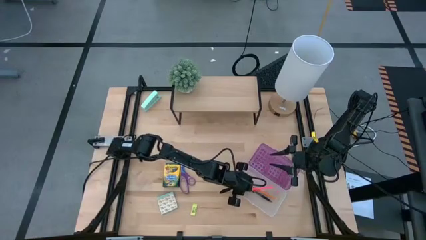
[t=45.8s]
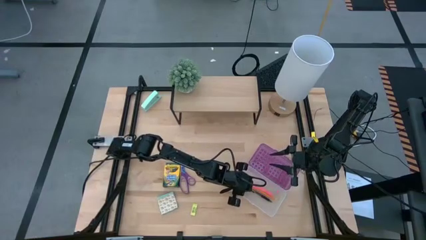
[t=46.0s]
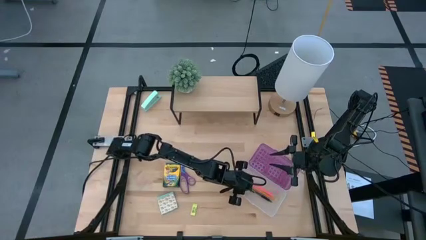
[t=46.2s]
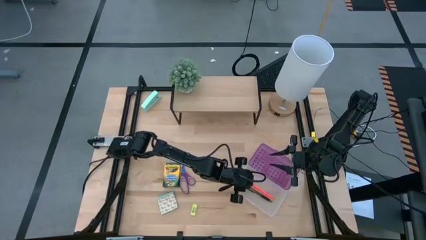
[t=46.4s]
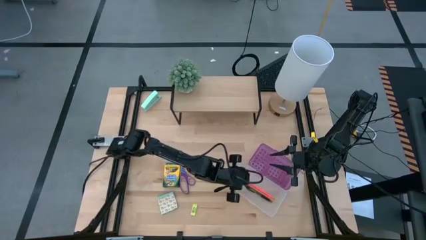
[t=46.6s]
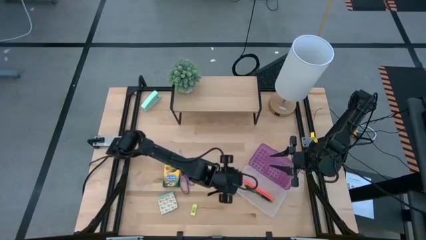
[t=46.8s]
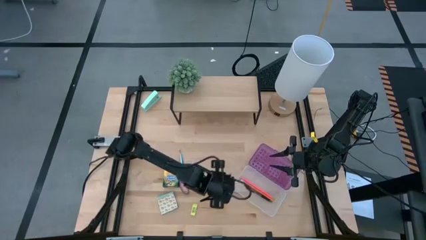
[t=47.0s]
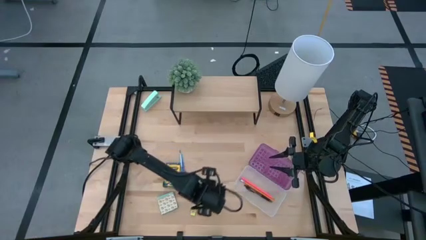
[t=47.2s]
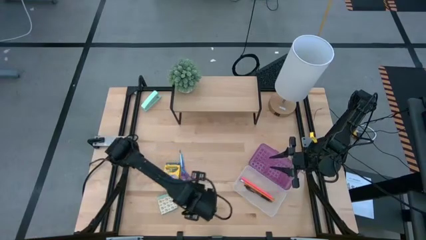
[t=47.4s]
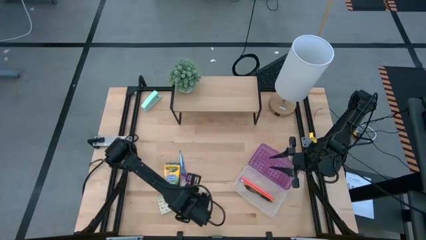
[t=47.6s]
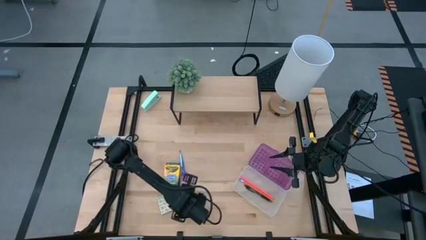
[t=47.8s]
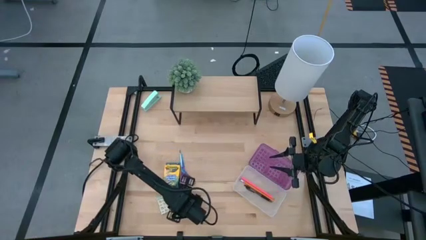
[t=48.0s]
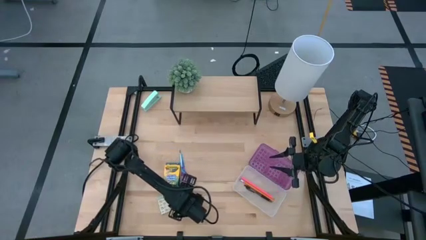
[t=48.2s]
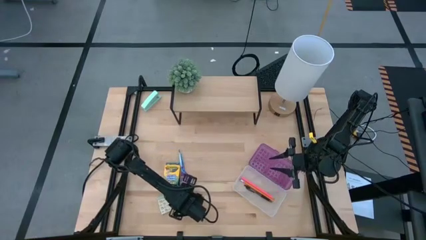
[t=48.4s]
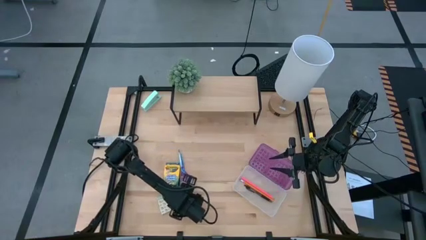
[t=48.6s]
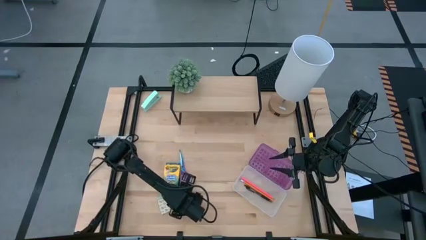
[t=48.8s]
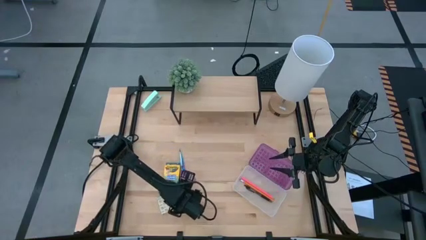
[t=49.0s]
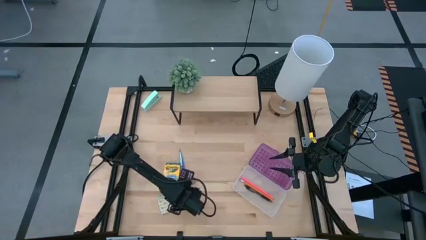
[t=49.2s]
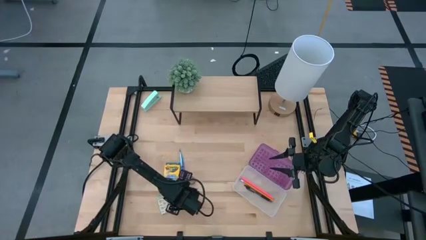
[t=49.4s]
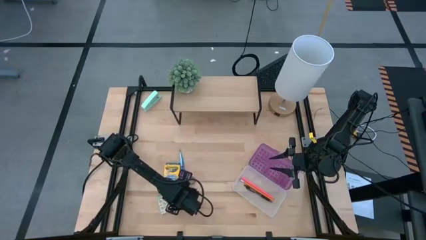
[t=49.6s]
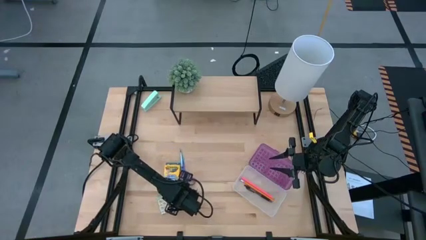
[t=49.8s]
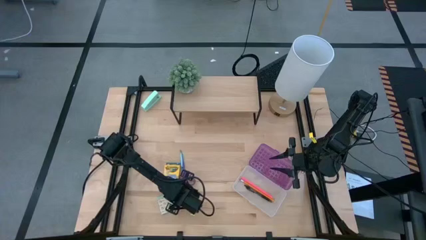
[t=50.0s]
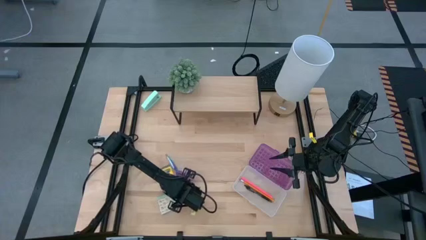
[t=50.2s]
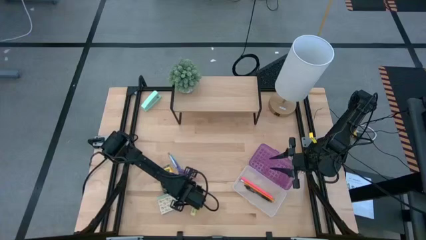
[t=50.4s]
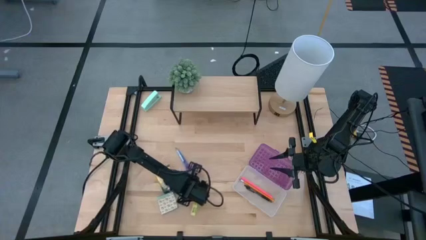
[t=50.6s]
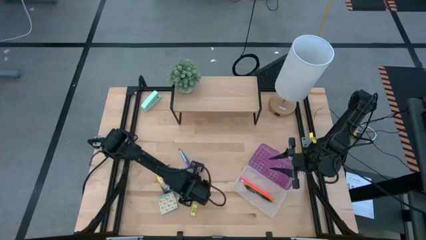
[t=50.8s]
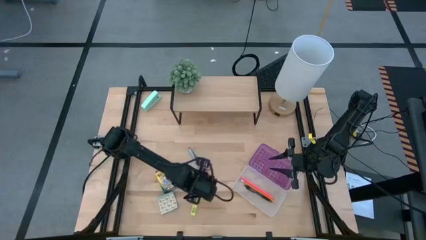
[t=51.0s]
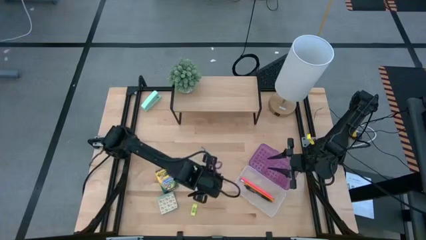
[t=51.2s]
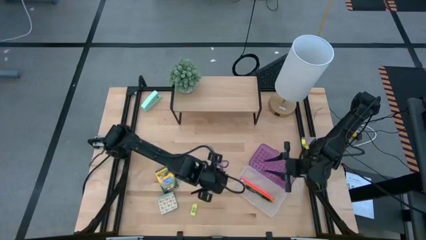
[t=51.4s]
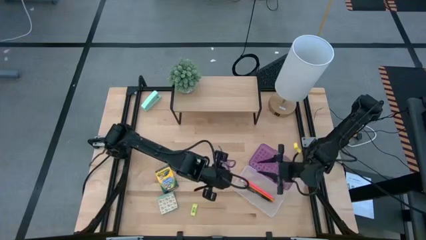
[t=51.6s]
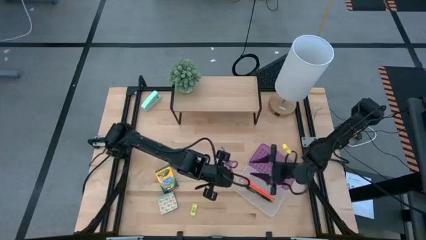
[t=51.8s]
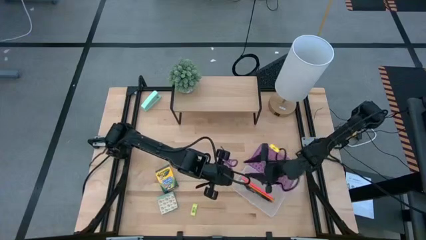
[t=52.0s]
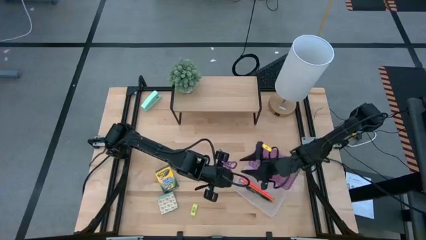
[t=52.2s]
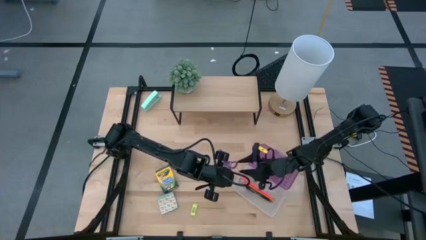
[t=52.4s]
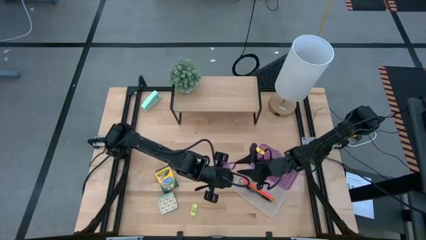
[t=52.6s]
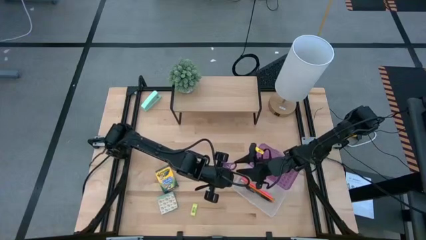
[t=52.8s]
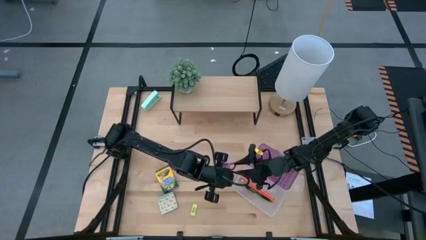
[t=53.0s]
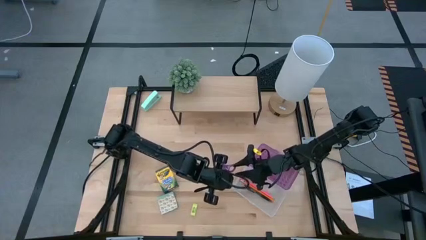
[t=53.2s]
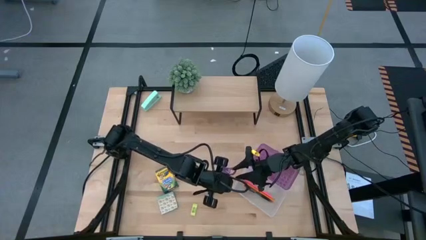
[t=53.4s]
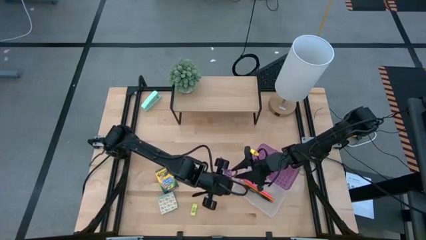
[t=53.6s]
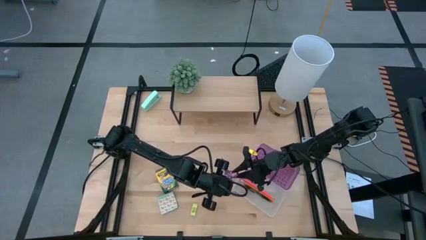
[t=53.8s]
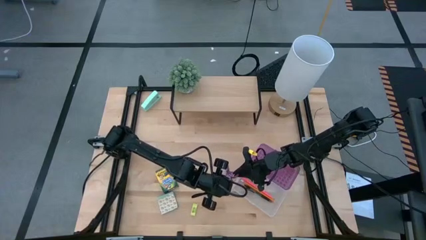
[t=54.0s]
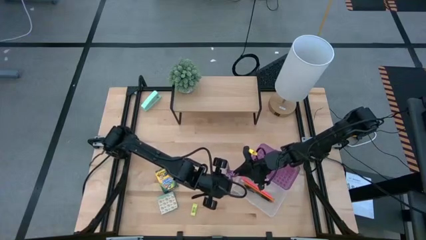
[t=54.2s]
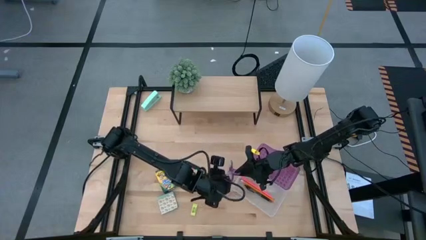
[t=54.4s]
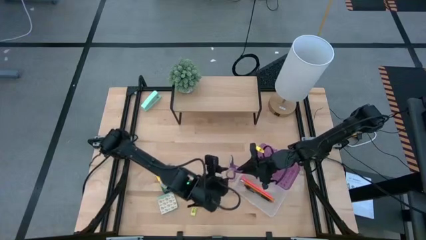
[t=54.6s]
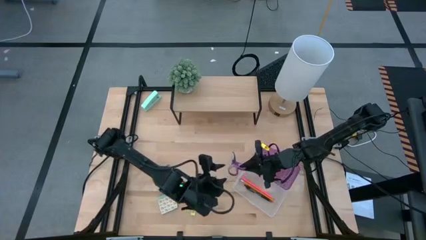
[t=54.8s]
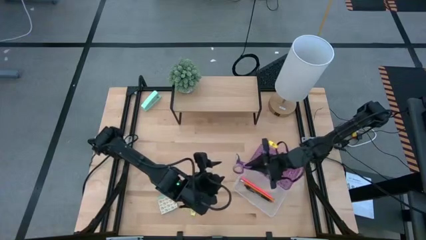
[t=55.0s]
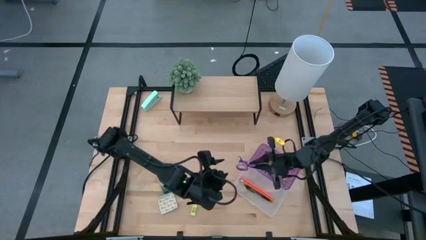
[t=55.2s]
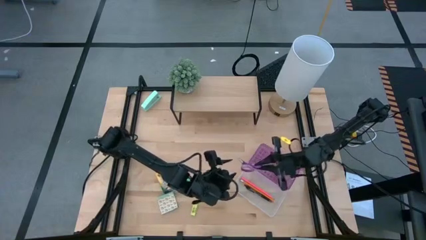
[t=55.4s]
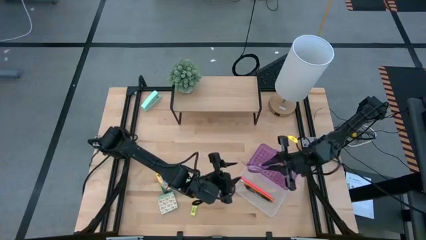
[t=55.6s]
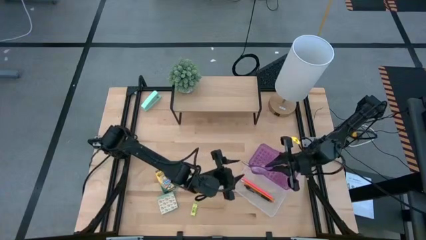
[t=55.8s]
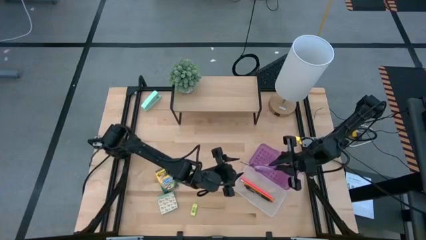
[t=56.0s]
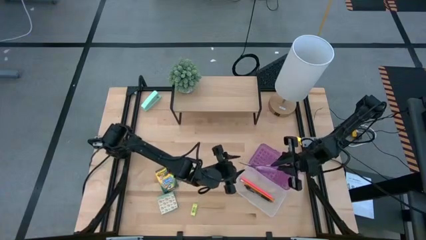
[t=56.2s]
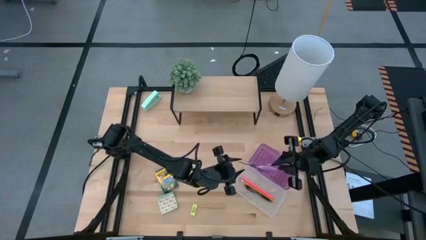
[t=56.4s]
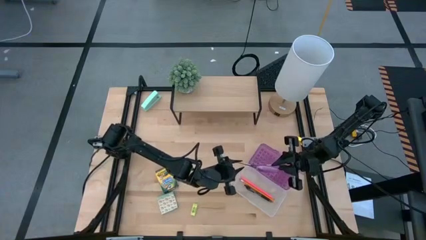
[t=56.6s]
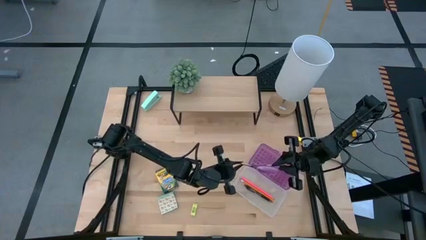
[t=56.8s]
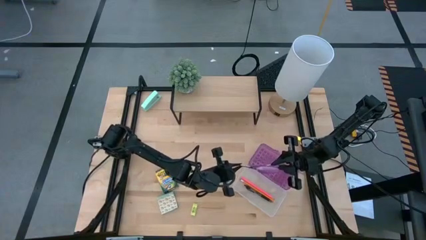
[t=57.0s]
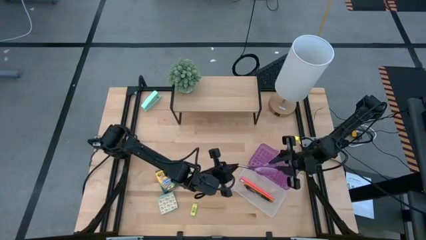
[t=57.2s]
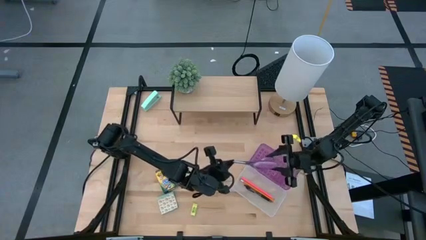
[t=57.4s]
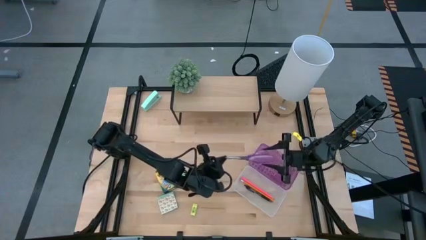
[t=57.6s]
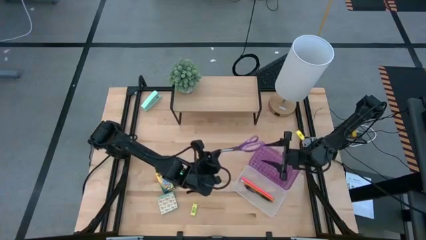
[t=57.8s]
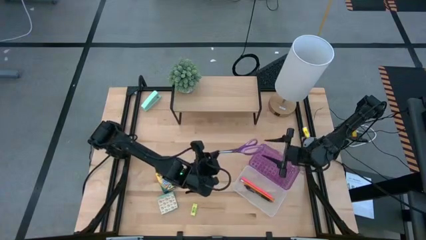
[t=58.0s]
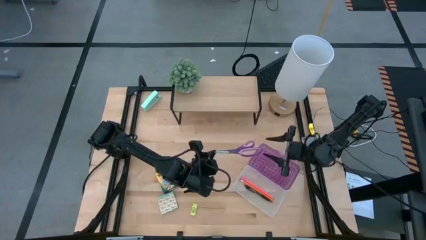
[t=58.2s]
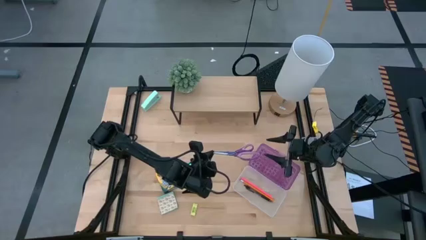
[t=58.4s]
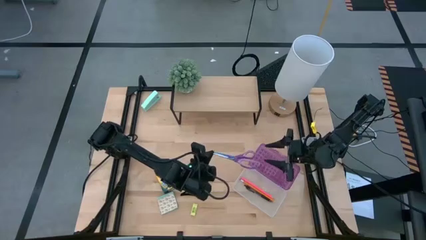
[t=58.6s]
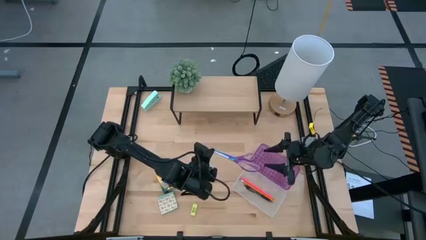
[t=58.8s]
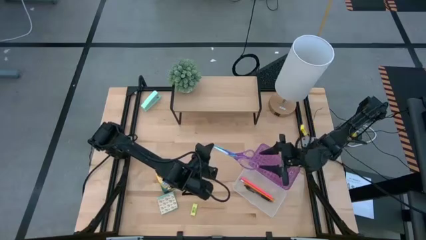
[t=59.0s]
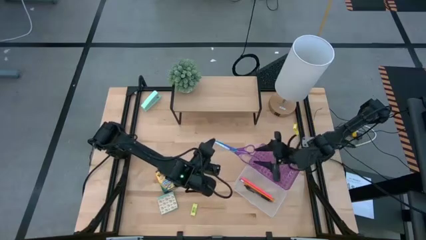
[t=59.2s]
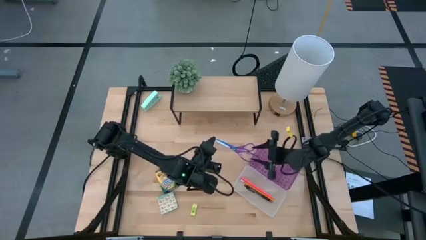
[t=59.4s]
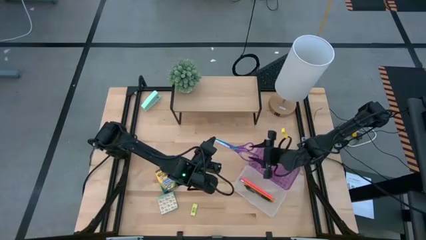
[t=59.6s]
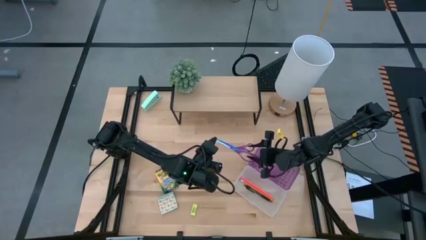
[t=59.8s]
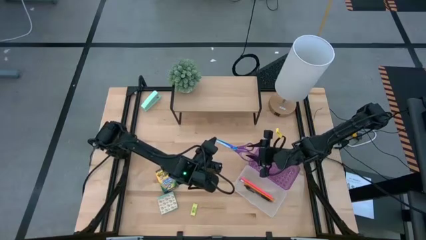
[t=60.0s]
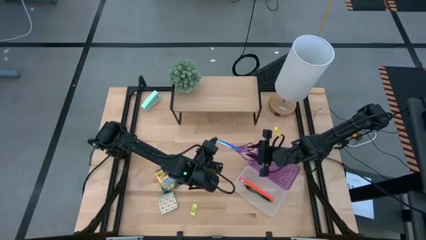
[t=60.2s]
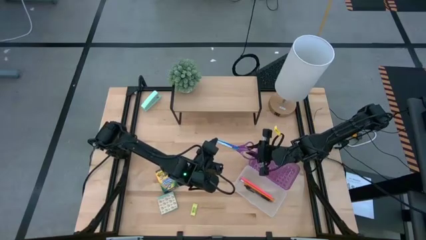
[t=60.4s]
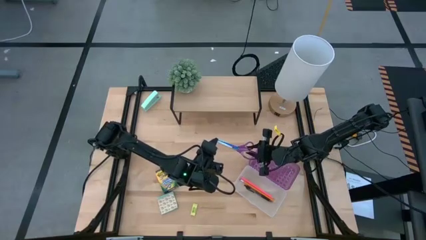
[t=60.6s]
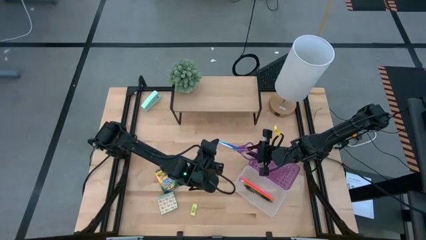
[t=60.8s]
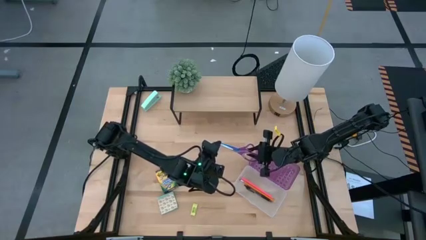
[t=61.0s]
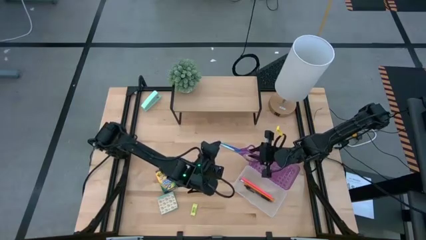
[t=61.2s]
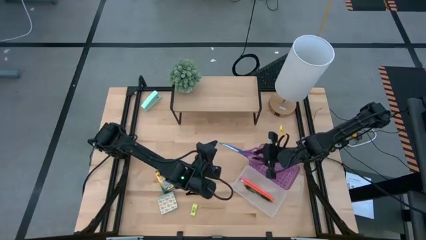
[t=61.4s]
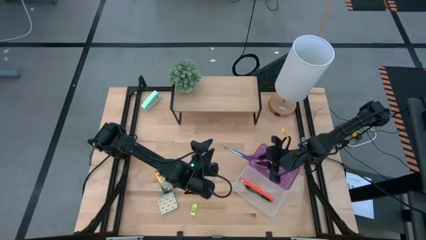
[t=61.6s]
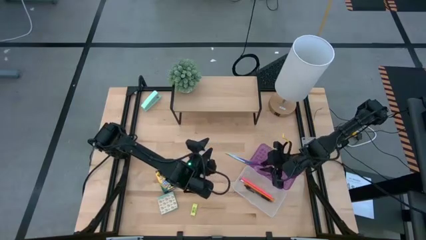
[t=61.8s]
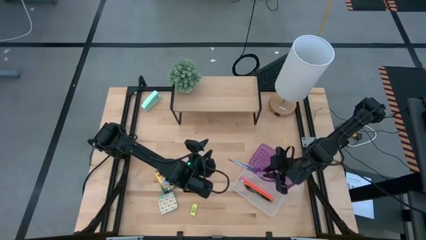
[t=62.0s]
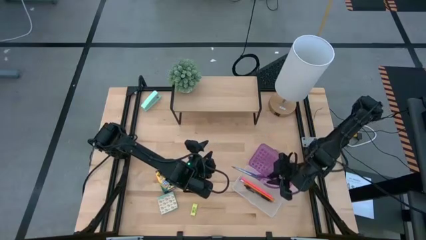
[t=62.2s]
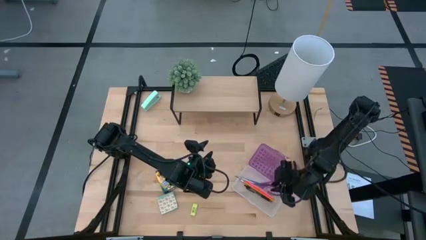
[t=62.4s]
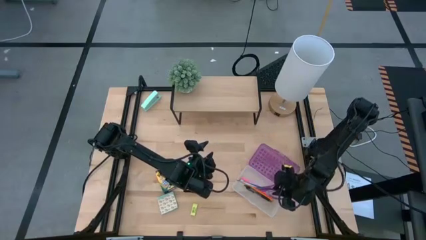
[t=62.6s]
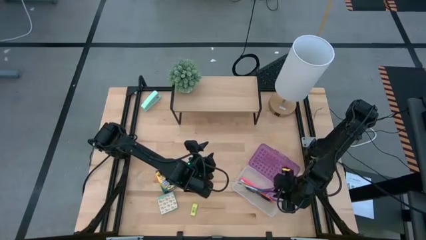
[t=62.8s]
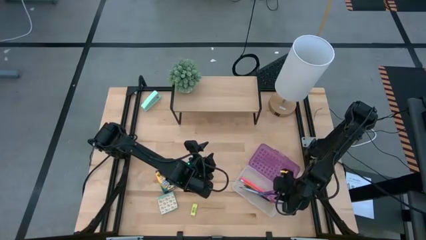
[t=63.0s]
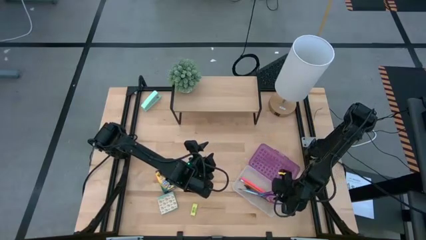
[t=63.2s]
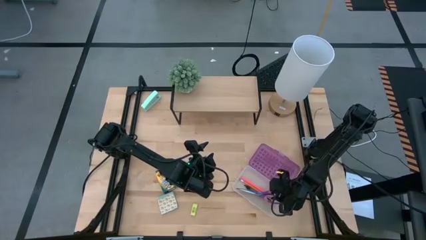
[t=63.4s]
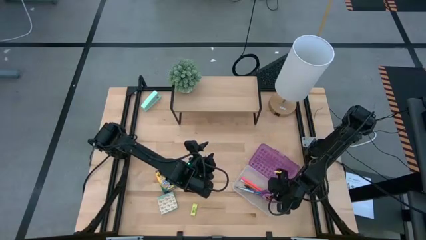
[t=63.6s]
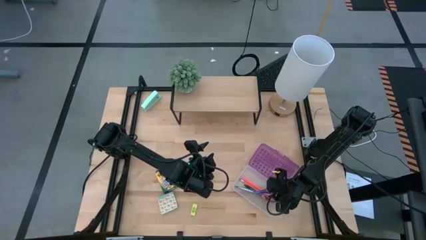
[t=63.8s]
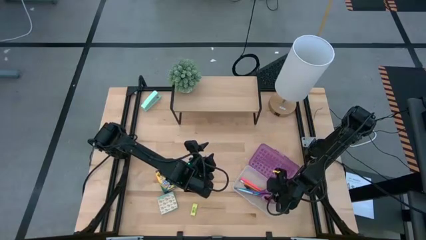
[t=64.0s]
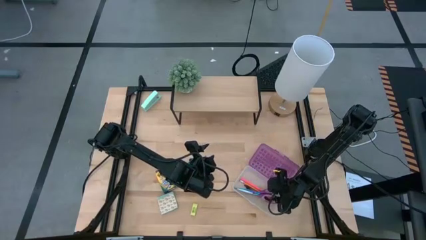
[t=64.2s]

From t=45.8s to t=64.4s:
Task: Pack school essentials
Put the purple scissors into the purple supply box
